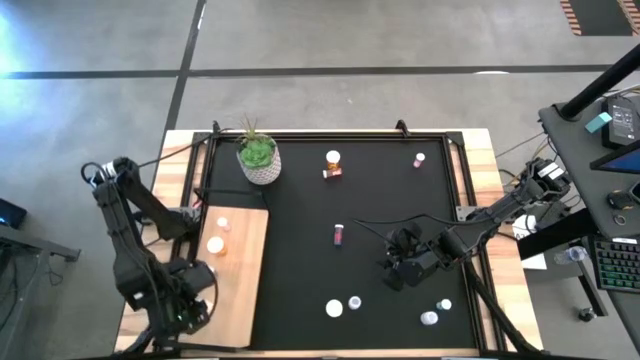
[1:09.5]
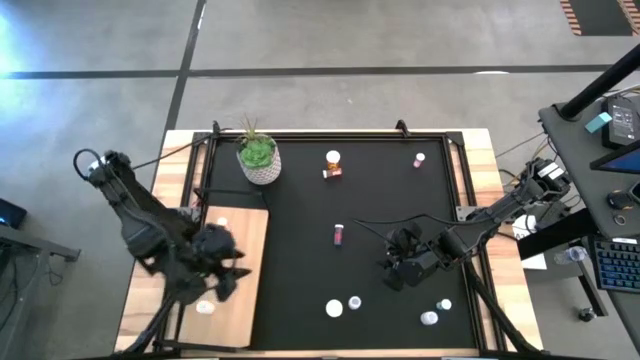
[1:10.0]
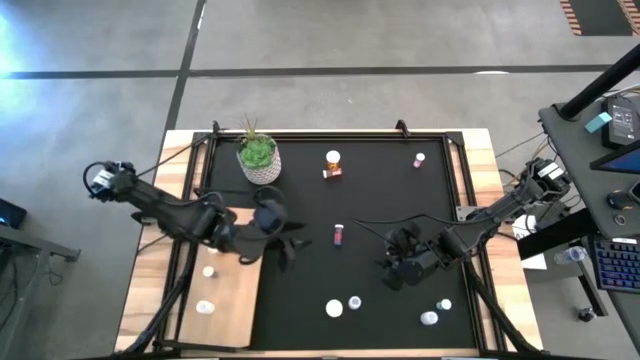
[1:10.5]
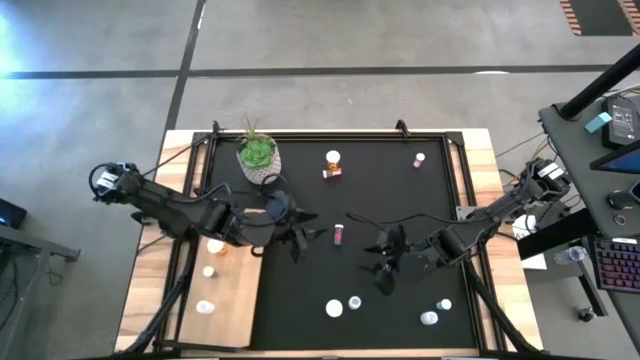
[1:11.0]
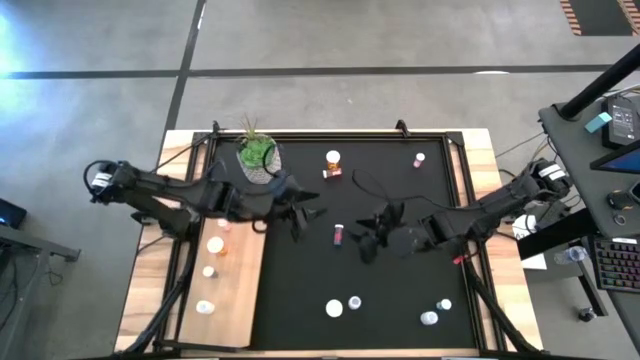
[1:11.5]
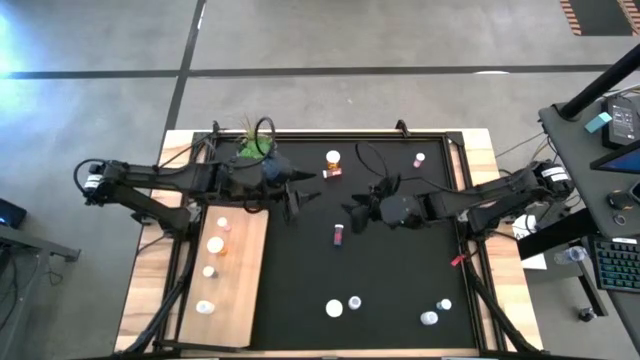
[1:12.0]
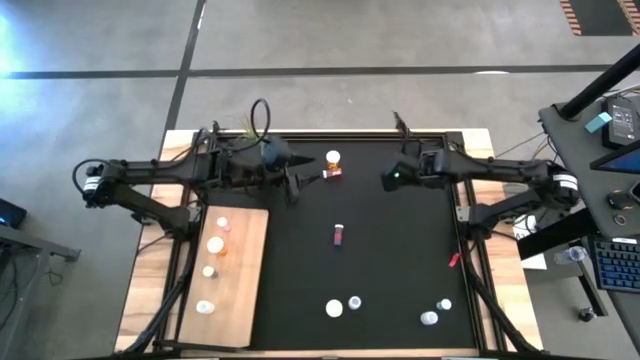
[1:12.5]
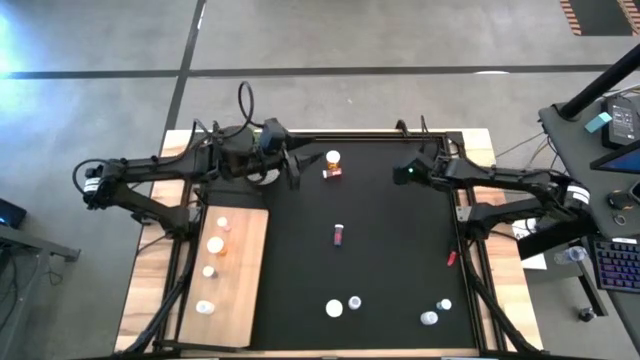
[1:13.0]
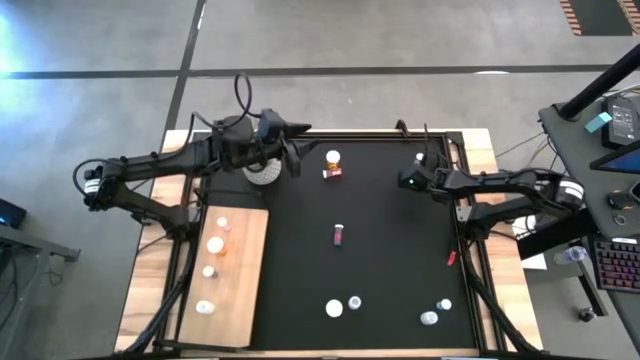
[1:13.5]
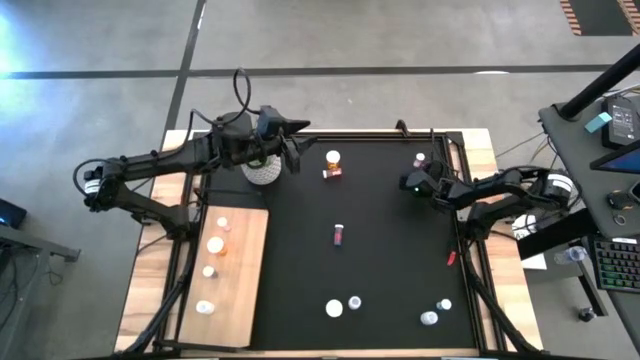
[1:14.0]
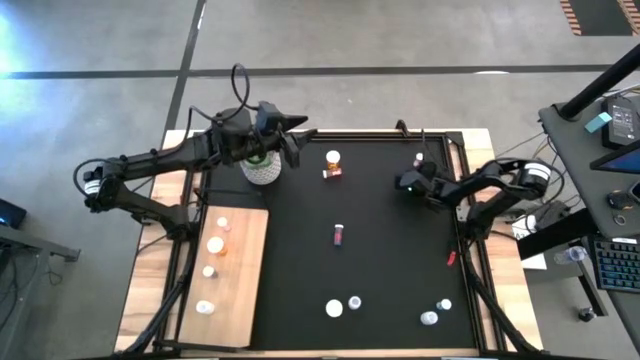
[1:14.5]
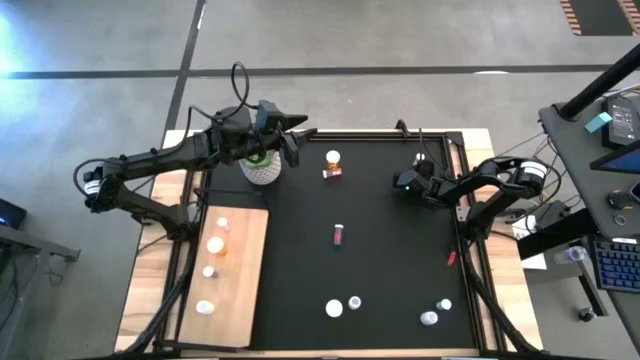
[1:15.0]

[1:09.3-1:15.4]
Task: Pick and place medicine bottles onto shelf by color
Put the right pink plastic pill bottle on the shelf aligned with the other pink pill bottle

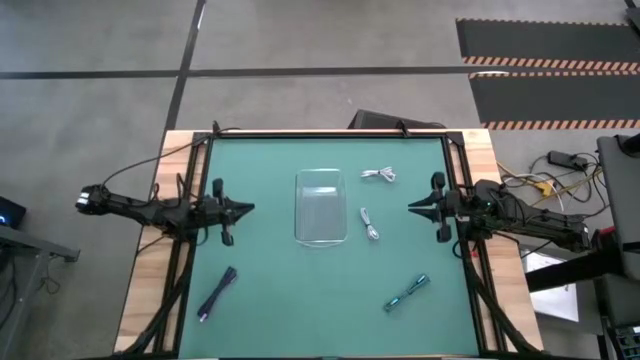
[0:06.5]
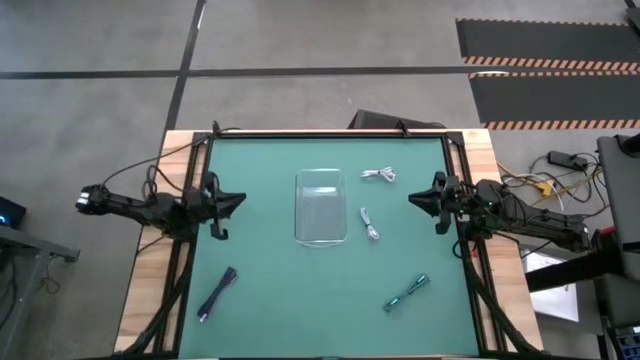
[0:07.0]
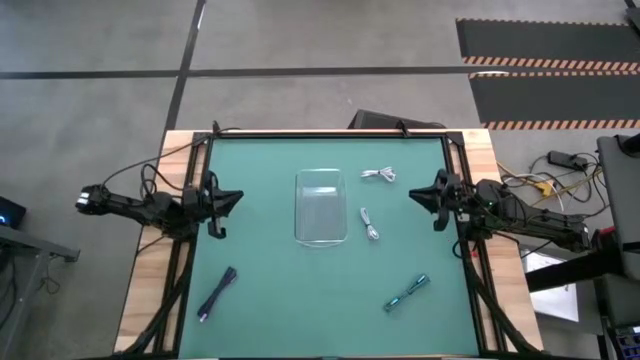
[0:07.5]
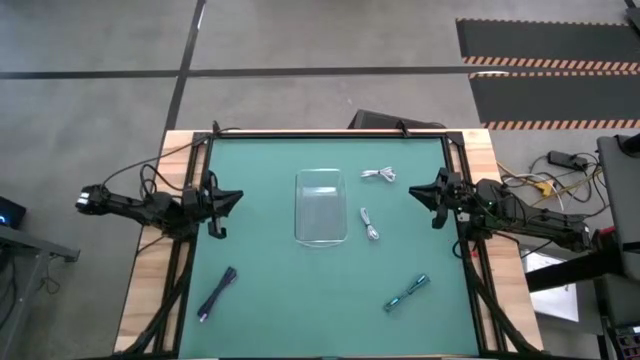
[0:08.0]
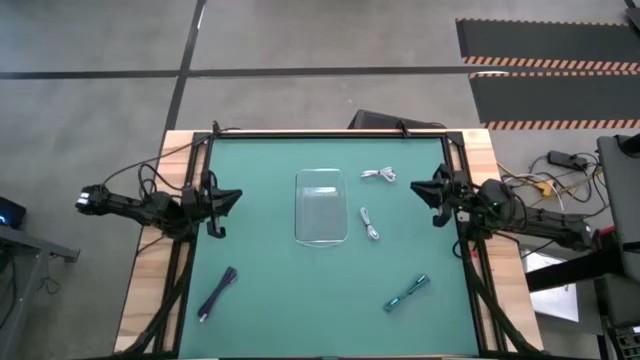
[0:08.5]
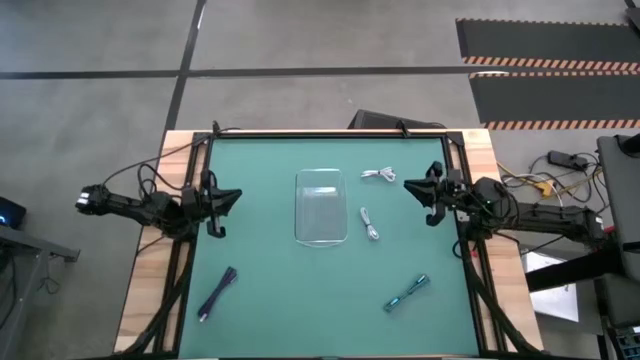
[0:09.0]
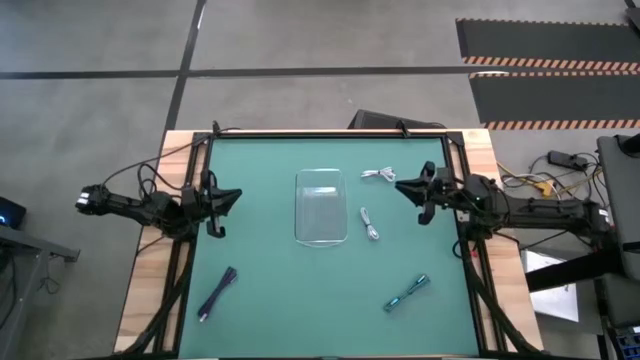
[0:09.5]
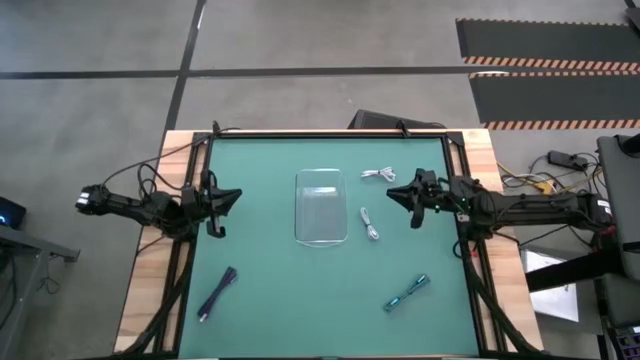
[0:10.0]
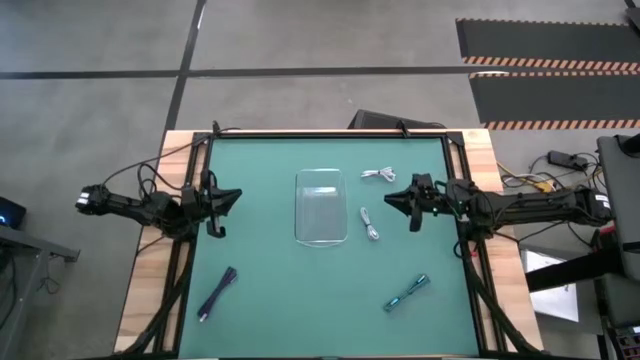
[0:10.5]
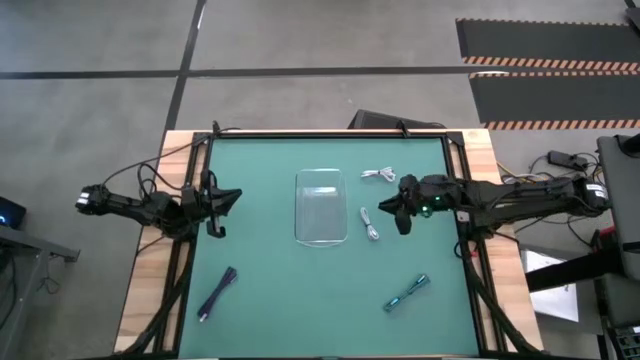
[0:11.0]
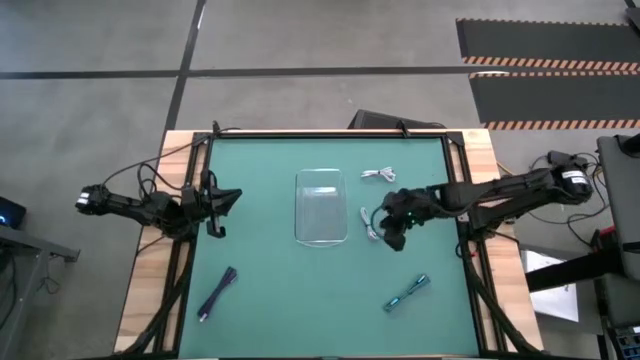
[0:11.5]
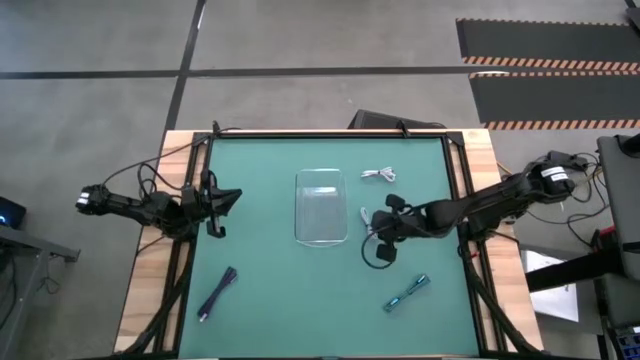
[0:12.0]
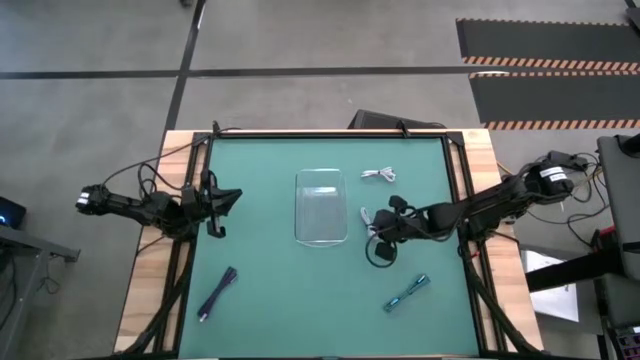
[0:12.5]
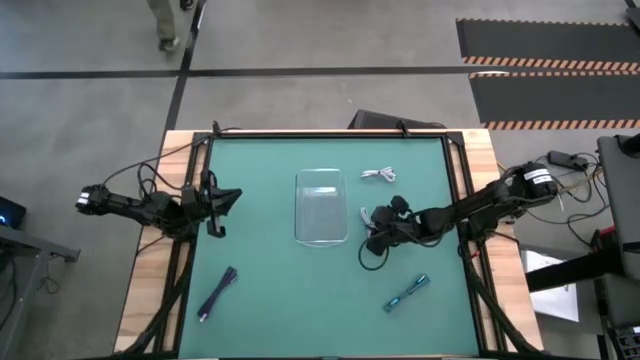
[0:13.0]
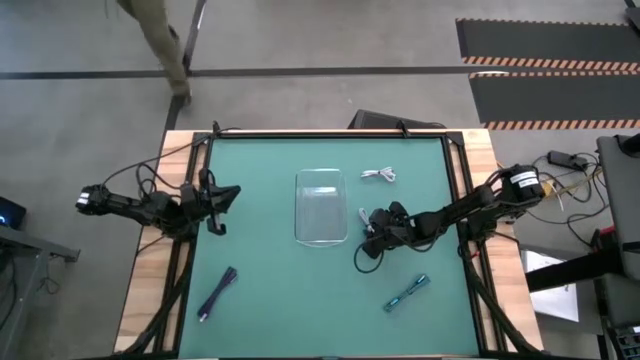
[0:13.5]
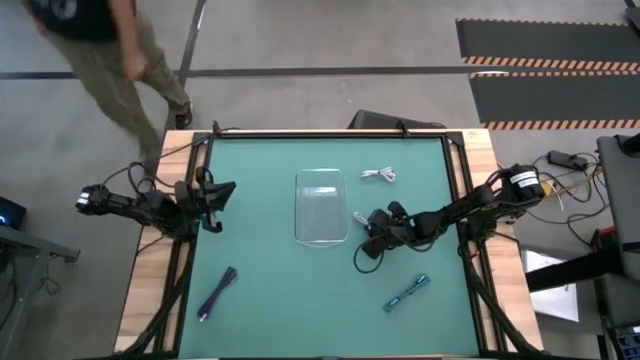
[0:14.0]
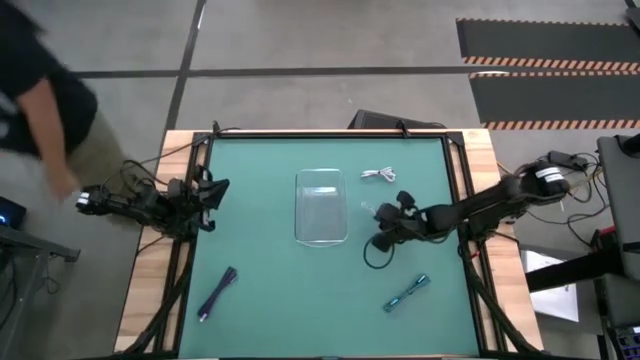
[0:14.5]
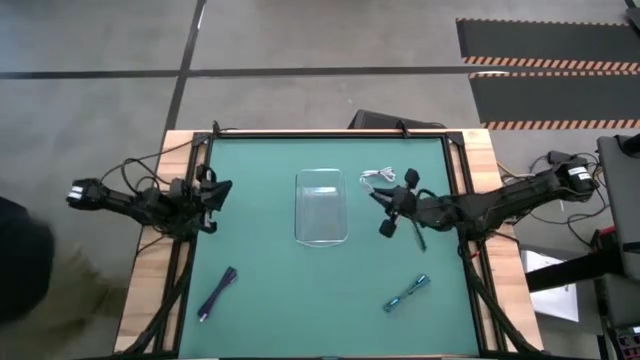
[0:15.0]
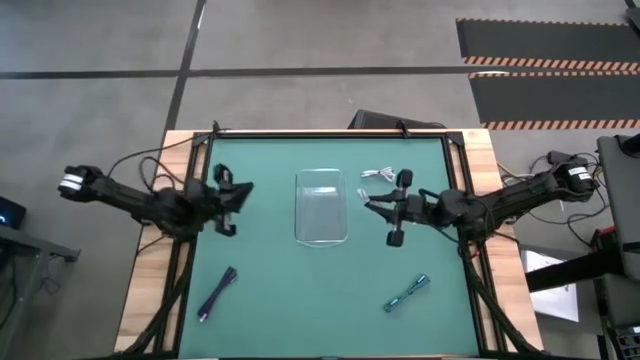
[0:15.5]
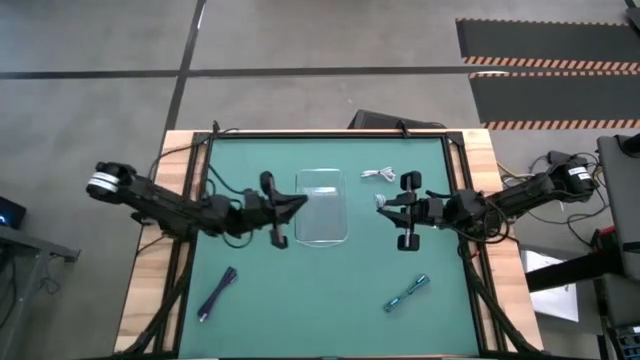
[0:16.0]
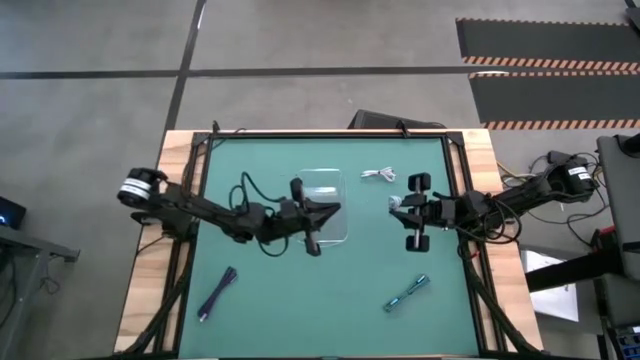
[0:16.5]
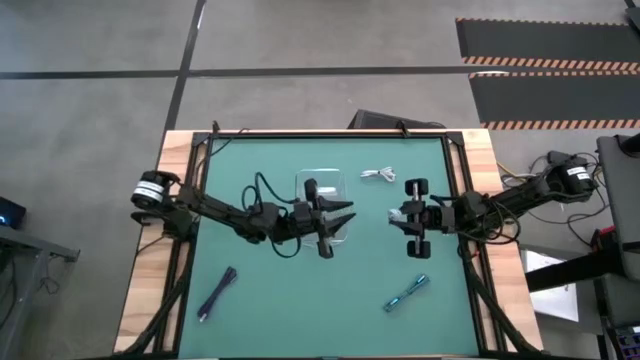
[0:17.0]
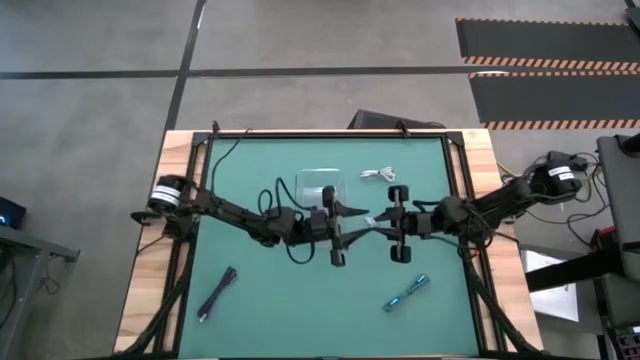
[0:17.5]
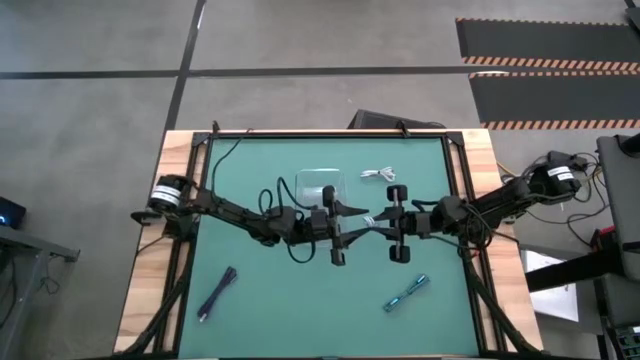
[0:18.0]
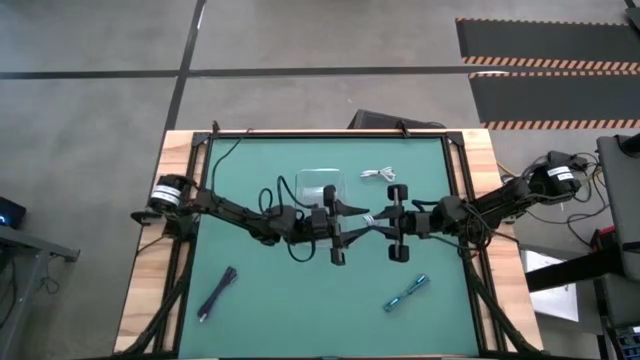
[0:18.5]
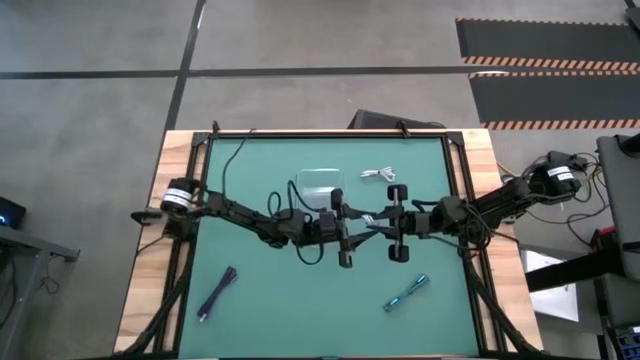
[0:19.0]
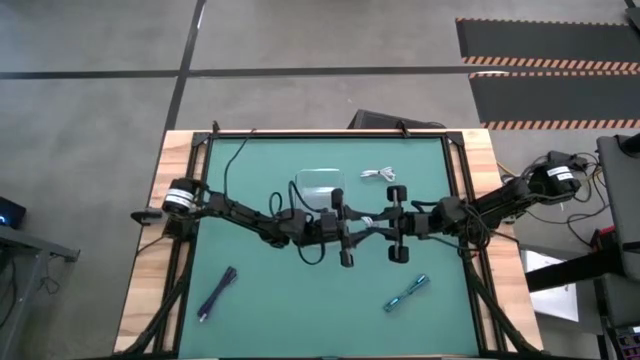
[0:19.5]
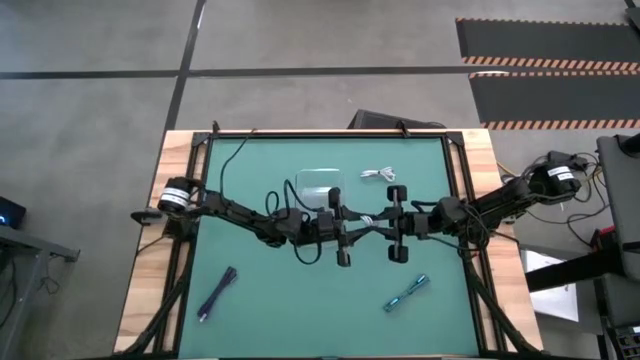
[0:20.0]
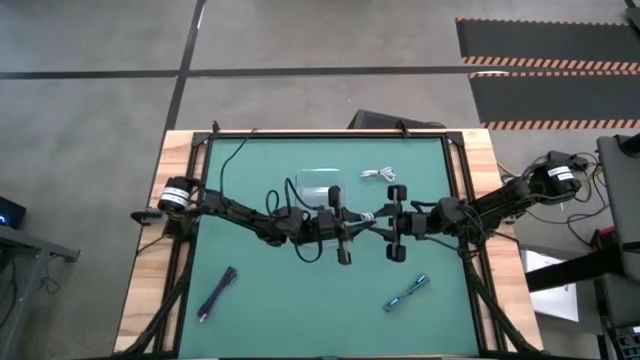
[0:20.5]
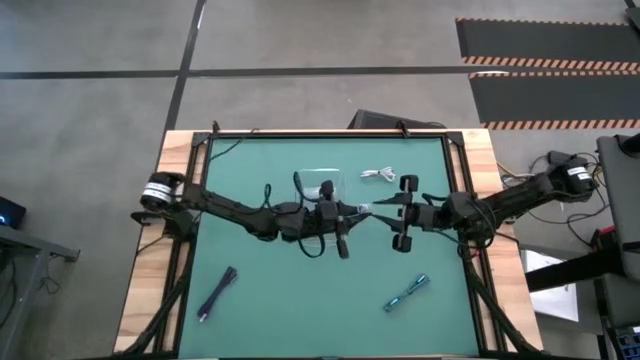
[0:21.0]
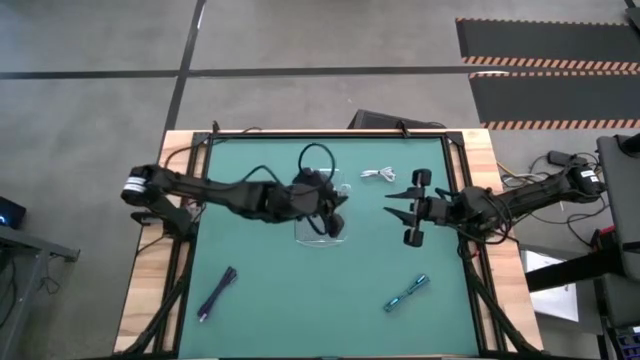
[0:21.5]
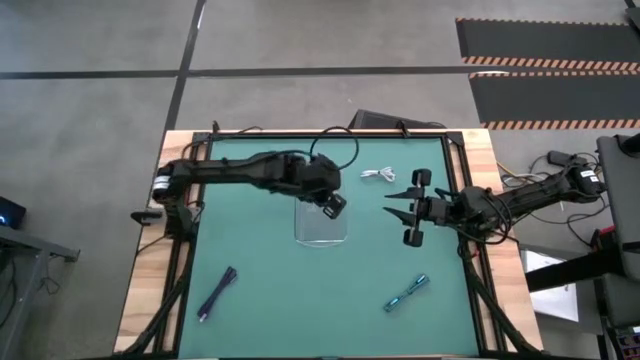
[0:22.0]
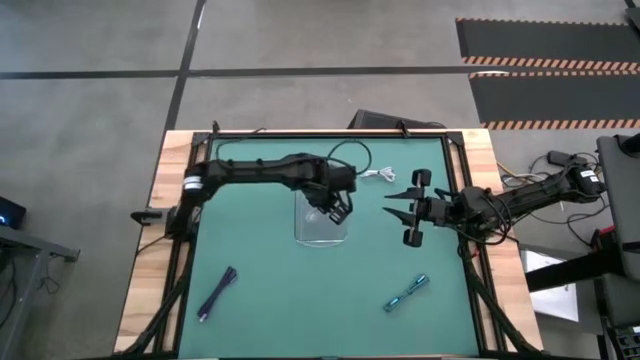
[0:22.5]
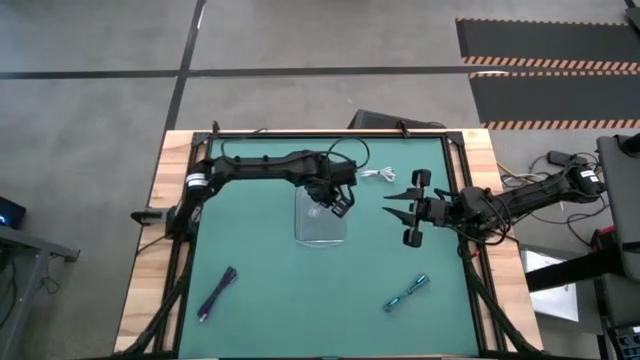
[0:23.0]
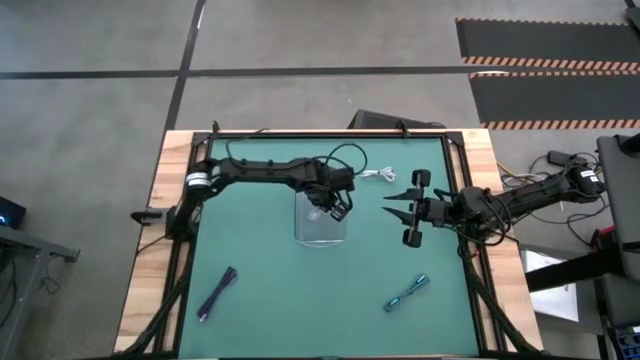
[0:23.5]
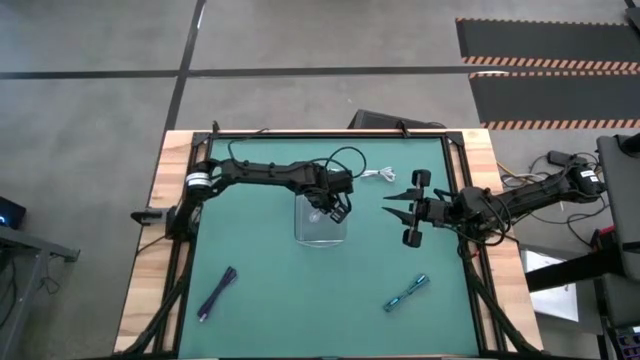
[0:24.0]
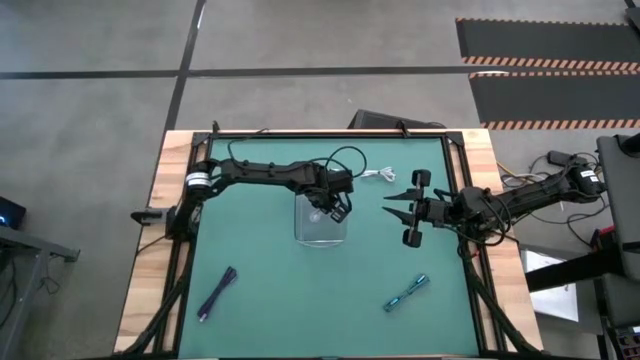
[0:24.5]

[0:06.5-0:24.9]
Task: Pick and place USB-C Cables
Put the bottom white charger cable into the transparent bin
